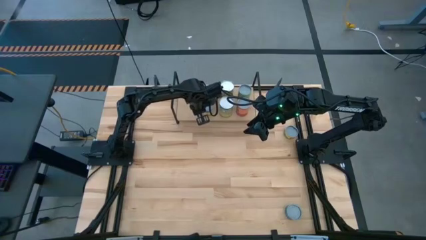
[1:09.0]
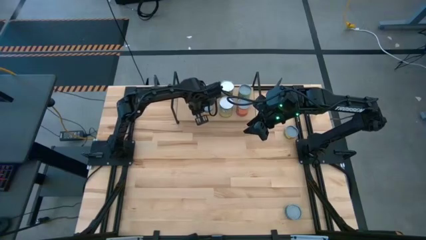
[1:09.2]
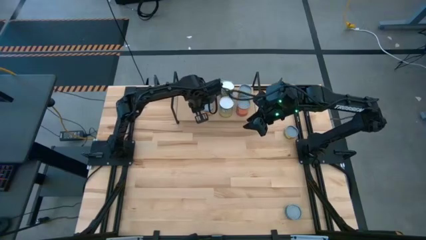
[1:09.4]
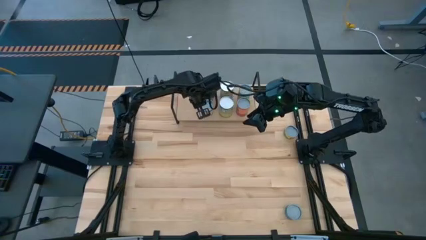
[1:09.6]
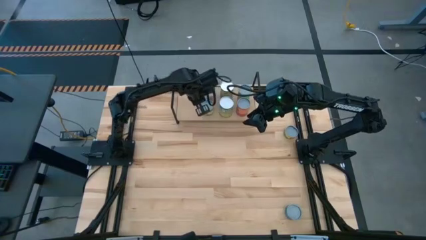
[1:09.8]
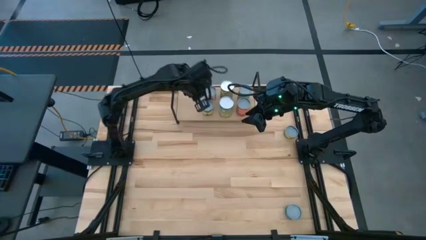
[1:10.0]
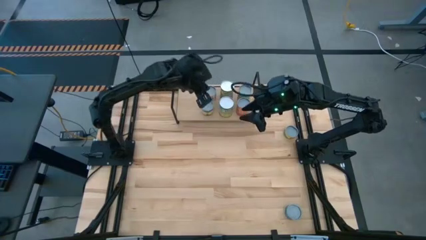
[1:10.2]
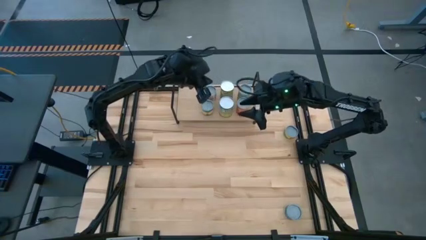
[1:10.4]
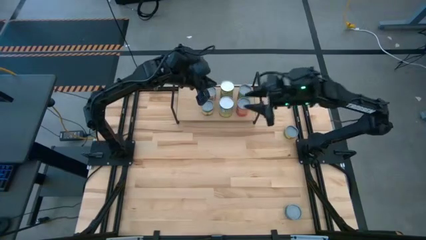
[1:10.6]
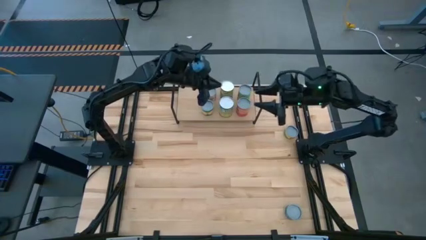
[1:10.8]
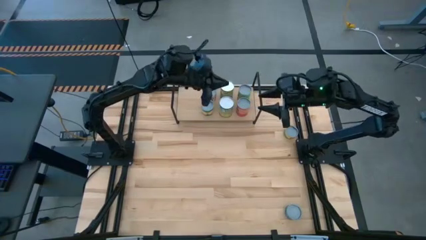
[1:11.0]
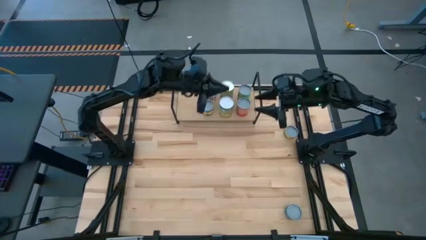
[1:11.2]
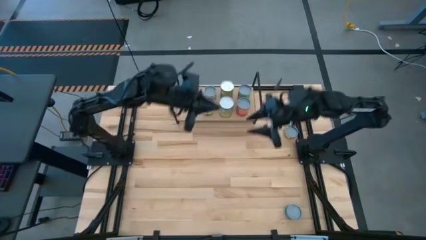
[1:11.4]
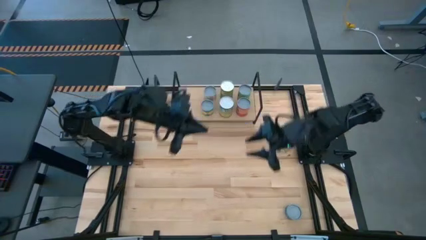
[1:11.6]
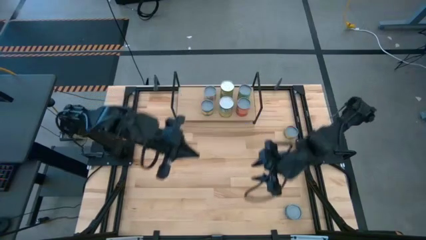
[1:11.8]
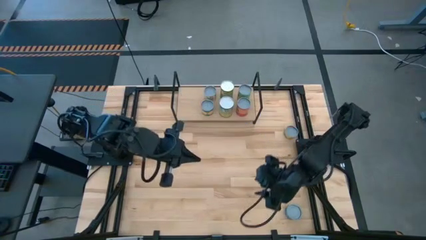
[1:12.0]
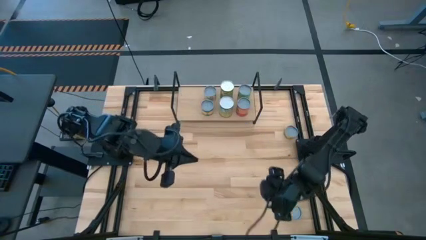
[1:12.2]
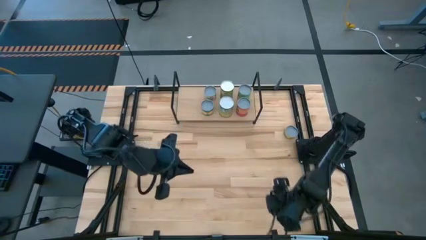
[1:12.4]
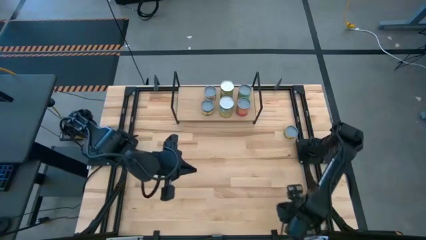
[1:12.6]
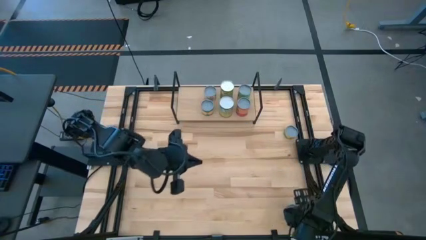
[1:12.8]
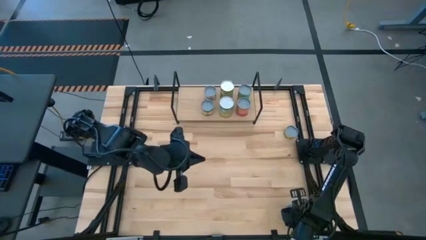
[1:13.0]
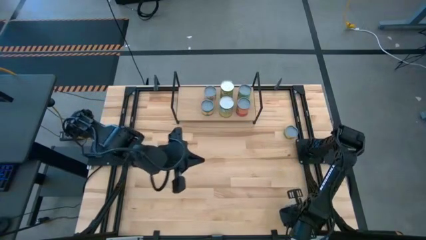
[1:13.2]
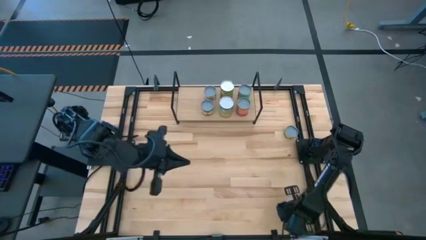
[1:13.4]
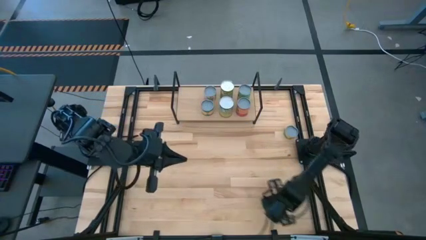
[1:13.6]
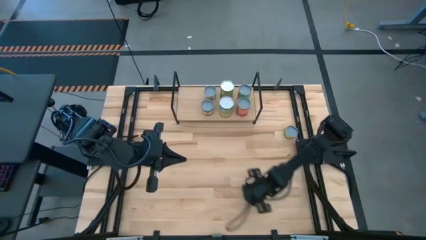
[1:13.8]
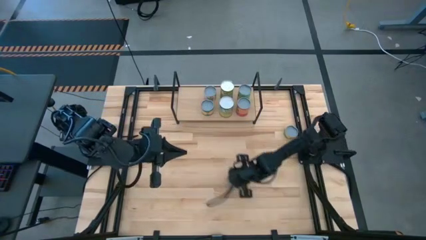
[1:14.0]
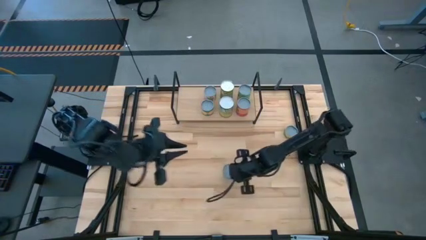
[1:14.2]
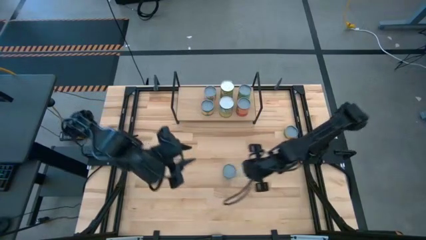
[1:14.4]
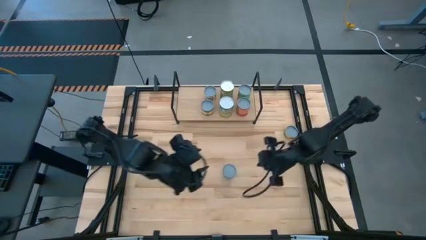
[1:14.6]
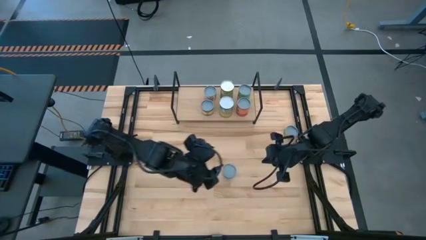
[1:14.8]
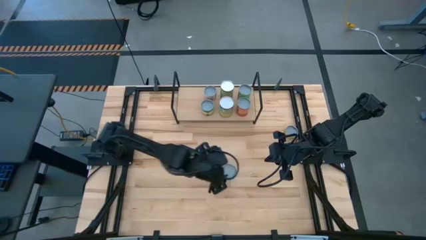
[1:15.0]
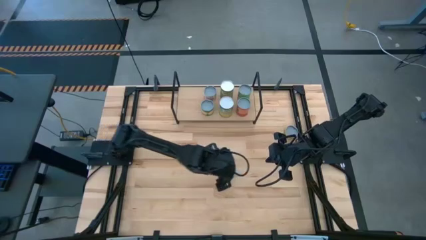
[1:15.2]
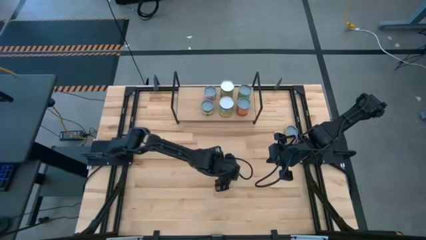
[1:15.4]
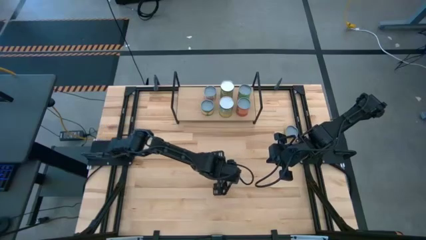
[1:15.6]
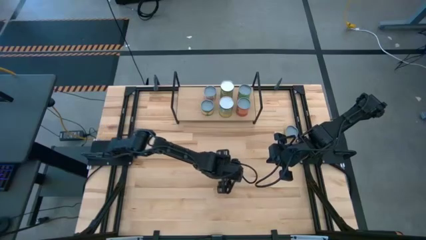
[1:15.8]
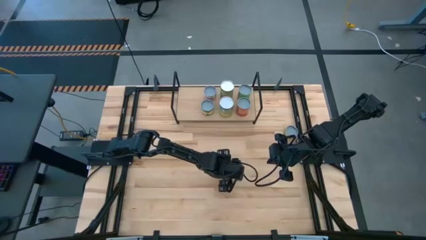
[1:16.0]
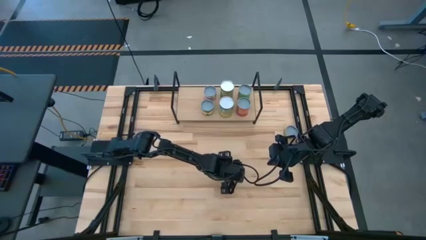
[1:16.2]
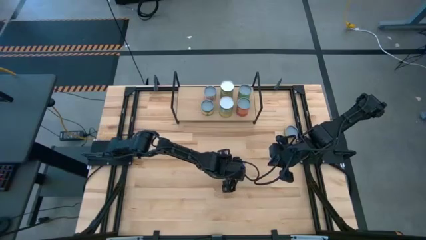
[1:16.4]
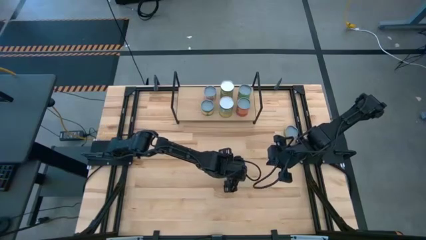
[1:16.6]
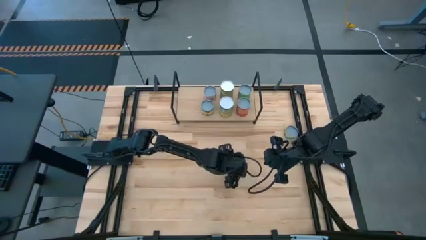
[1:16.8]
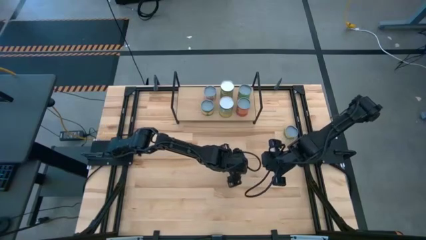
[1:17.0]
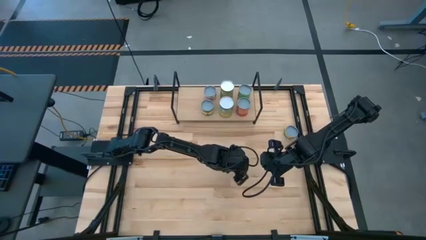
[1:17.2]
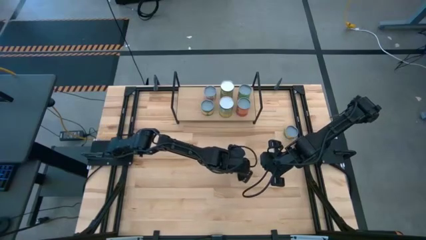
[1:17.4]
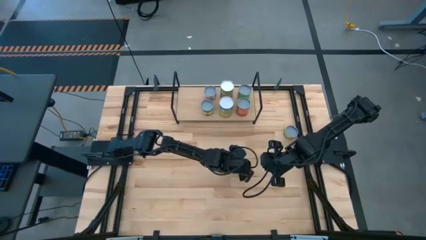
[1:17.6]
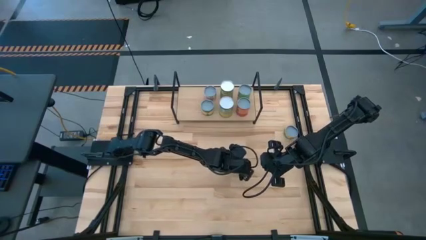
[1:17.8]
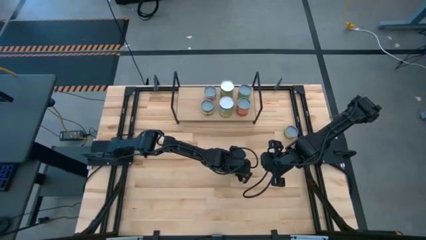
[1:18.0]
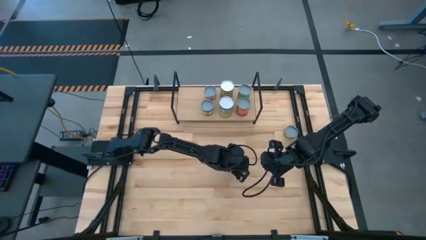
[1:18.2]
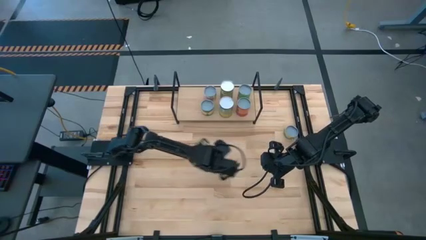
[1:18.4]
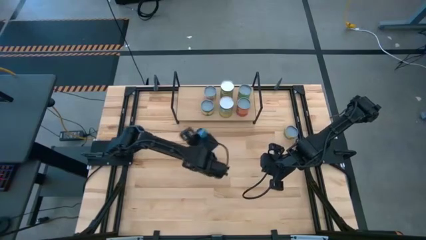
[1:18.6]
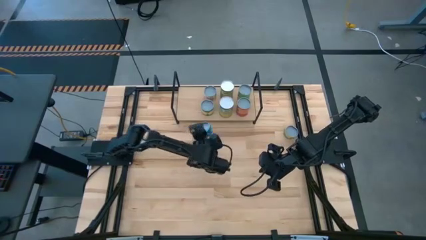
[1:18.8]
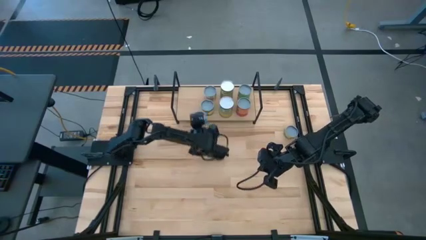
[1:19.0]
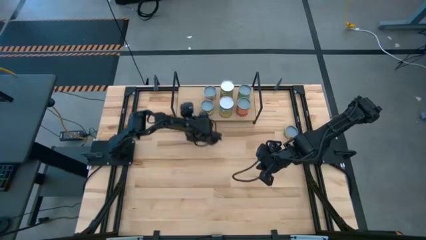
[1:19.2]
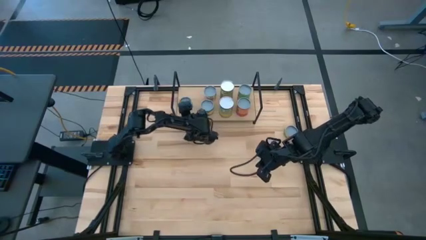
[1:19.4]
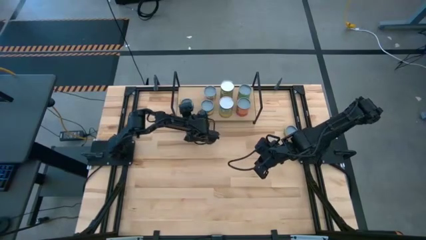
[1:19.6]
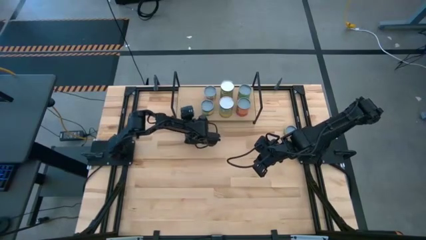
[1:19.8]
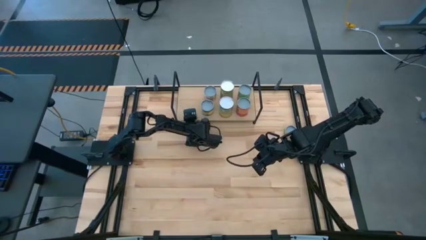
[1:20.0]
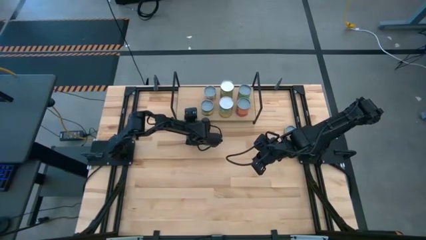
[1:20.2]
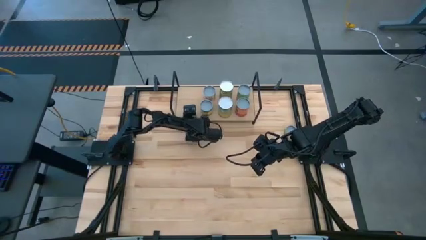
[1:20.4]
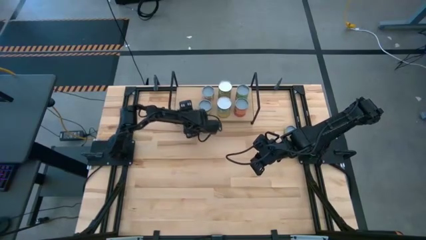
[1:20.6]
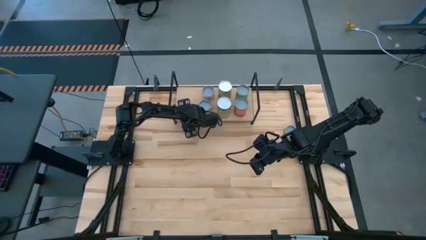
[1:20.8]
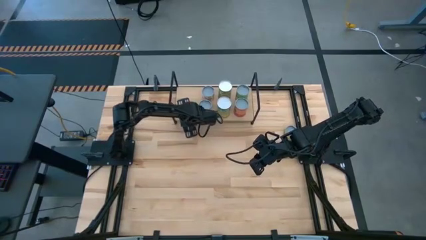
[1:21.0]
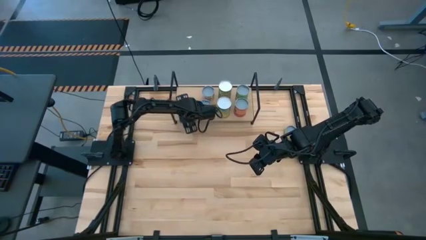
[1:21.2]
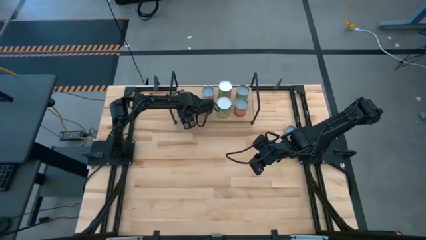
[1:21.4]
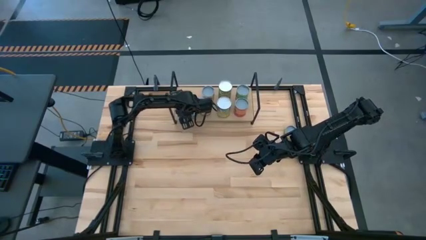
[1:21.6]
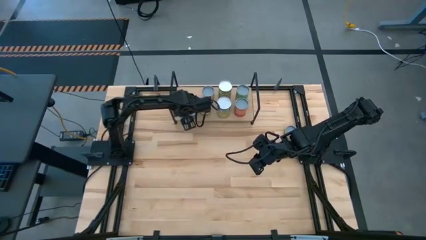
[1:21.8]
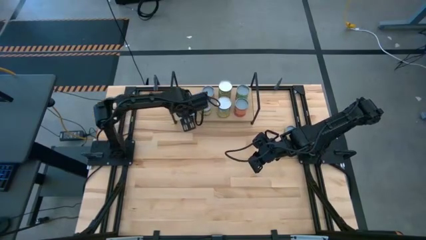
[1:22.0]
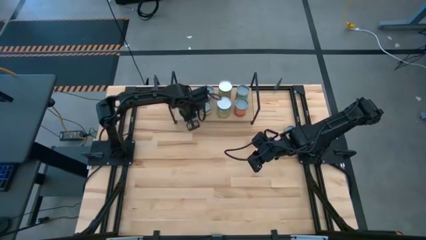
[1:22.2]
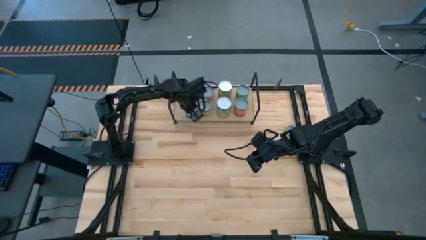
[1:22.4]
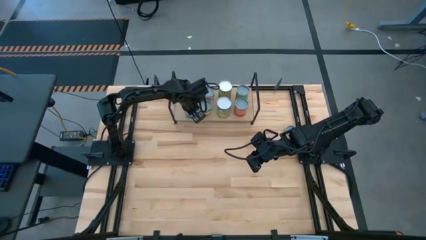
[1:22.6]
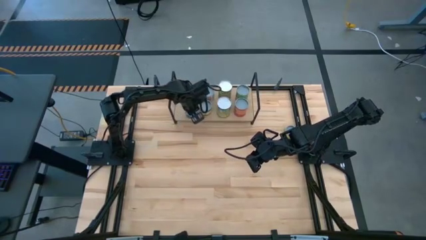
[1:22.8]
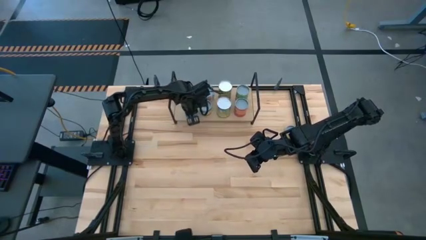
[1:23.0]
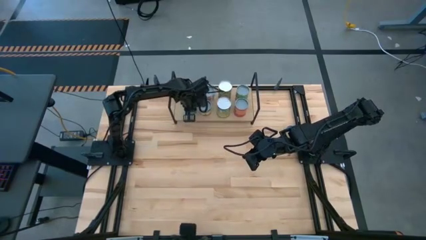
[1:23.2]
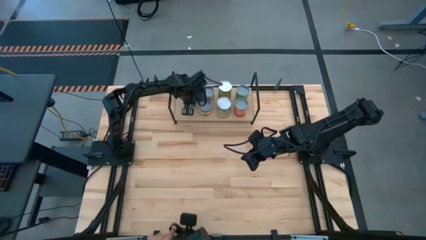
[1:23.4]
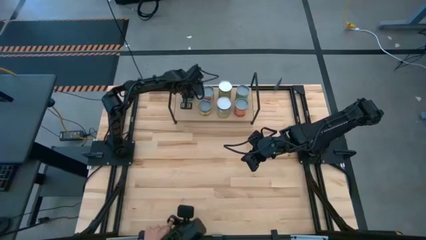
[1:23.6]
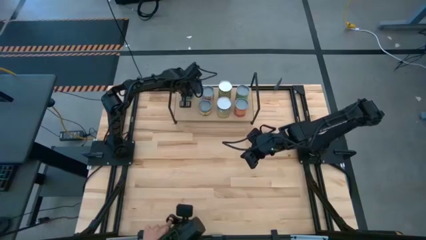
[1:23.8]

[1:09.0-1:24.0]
Task: Pick and place cans onto a shelf
Put the canned tuna on the shelf

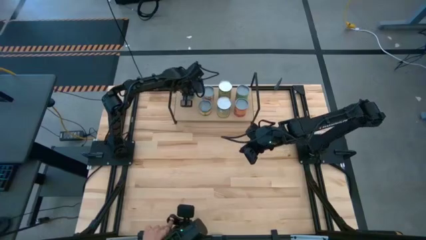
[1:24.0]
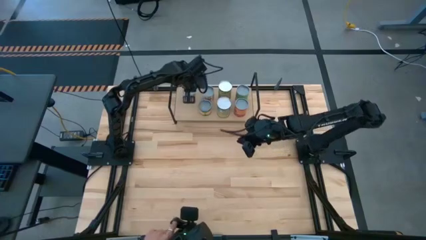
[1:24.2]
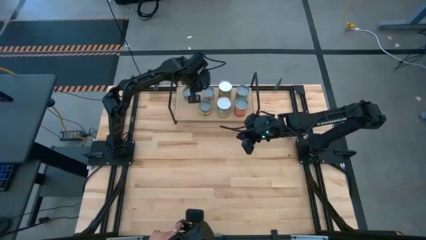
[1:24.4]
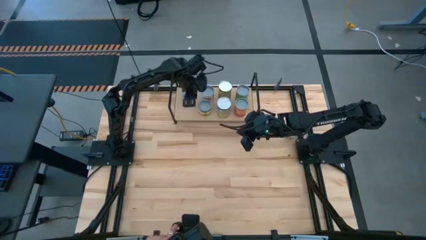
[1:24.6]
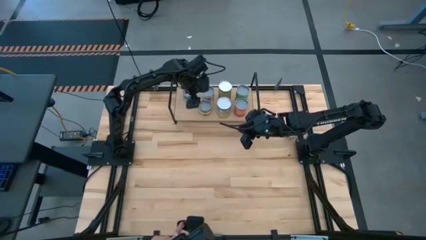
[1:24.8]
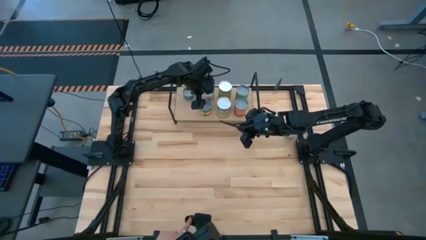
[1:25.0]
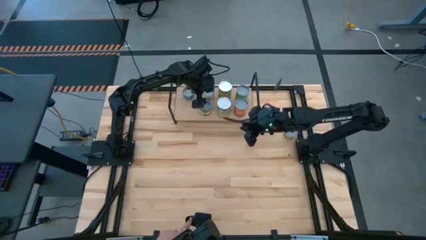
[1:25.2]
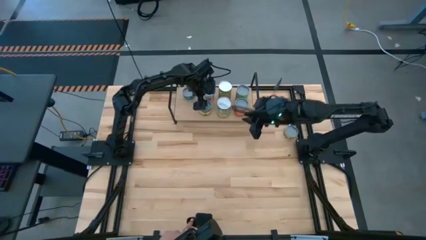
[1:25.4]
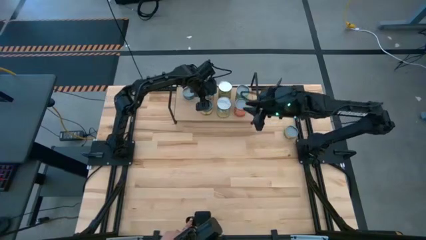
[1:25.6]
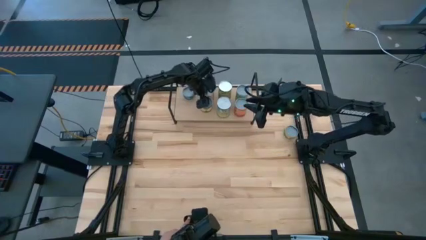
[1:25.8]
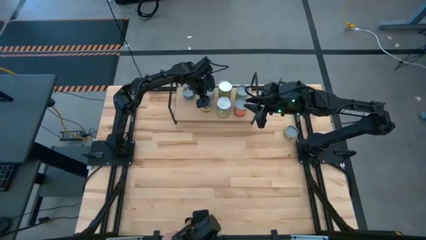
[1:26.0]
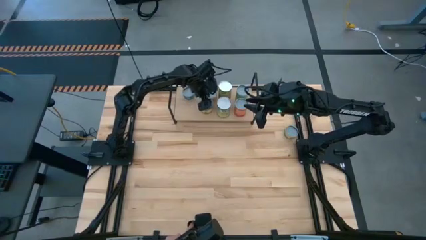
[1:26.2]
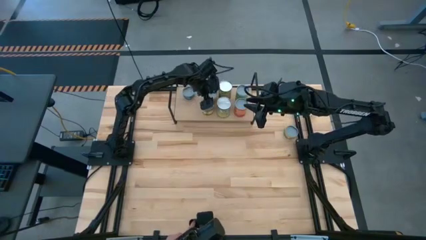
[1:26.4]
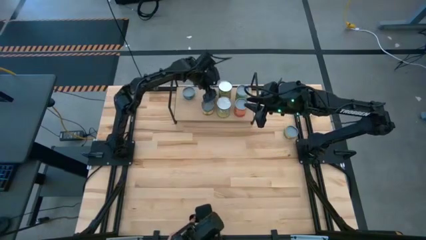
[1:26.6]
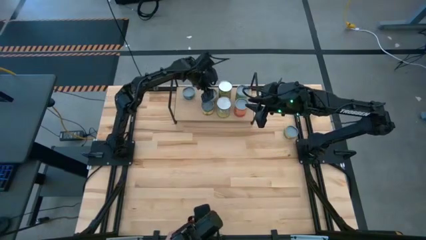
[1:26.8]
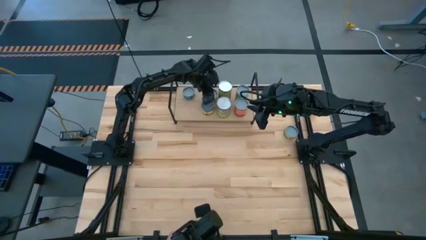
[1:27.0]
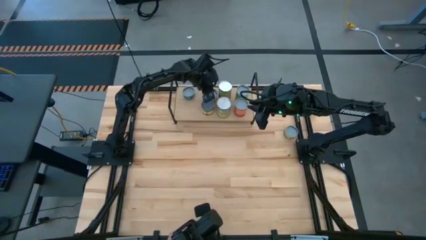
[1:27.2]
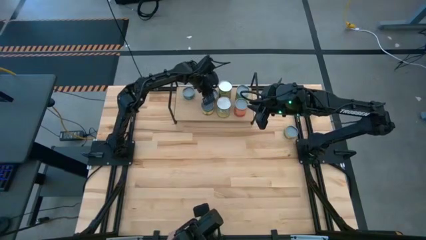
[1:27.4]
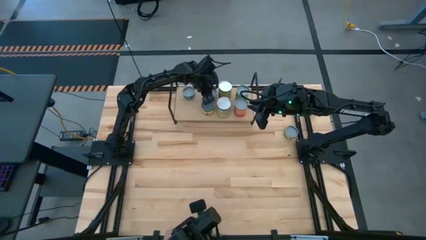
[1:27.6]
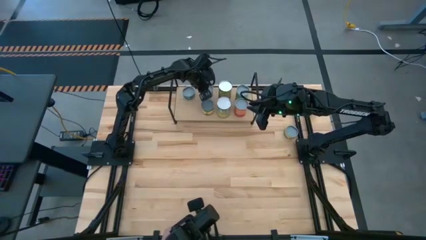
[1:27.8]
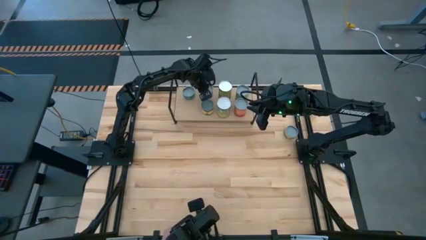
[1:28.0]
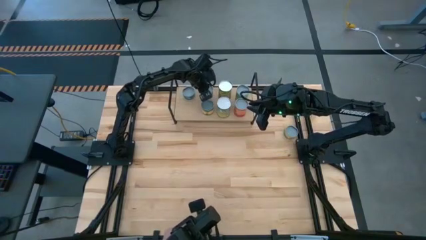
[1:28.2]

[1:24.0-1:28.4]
Adjust the canned goods on the shelf
